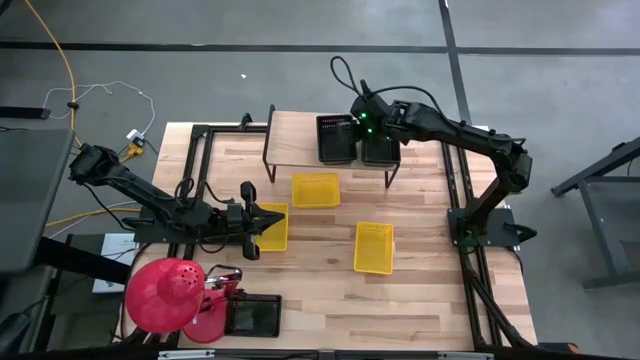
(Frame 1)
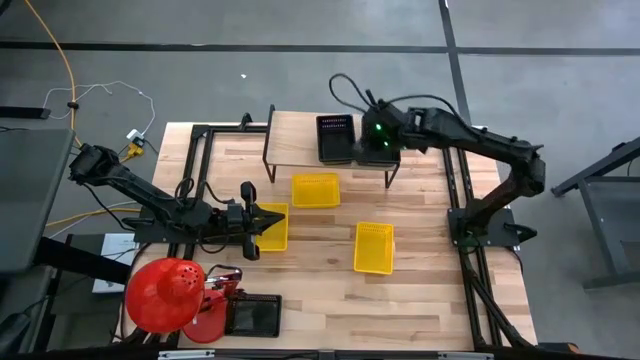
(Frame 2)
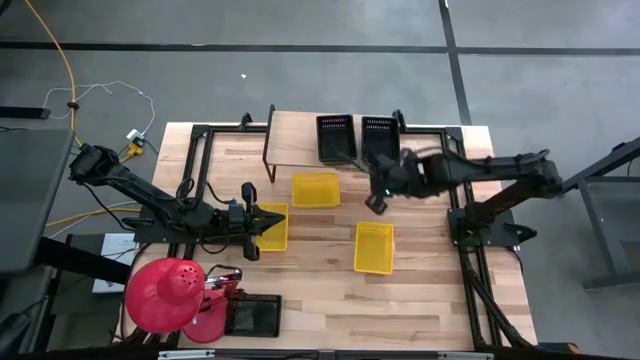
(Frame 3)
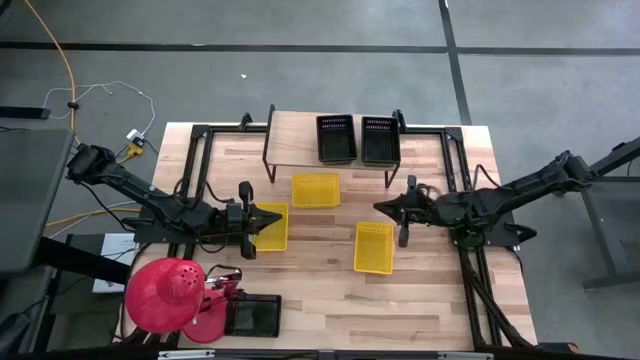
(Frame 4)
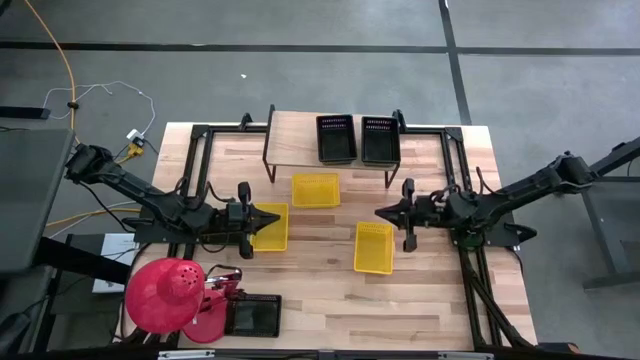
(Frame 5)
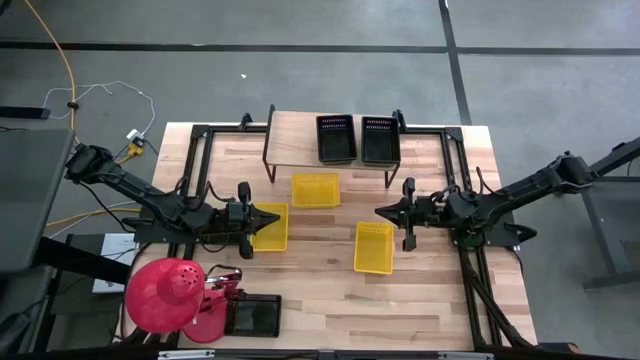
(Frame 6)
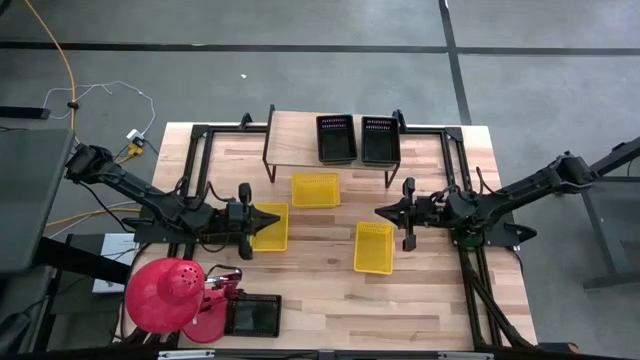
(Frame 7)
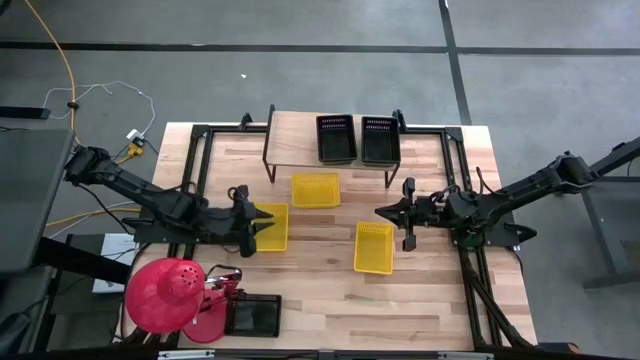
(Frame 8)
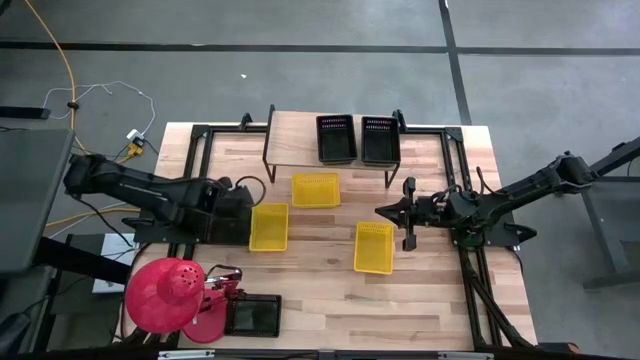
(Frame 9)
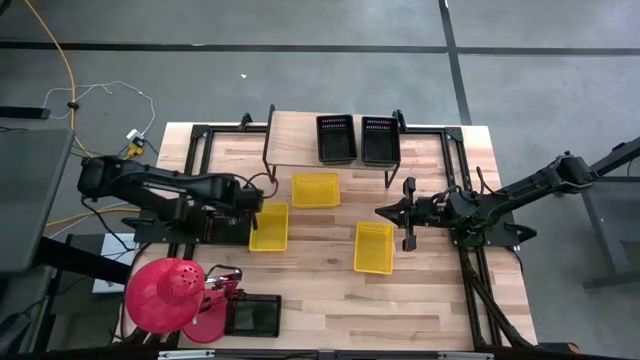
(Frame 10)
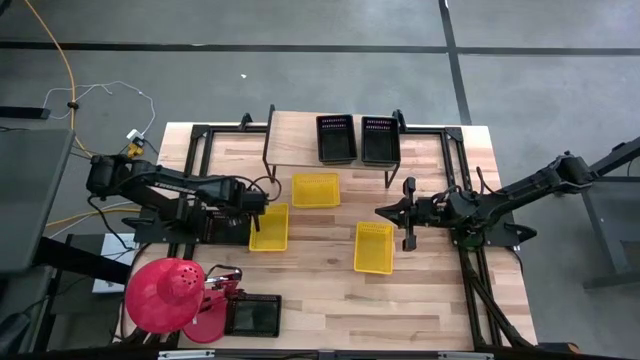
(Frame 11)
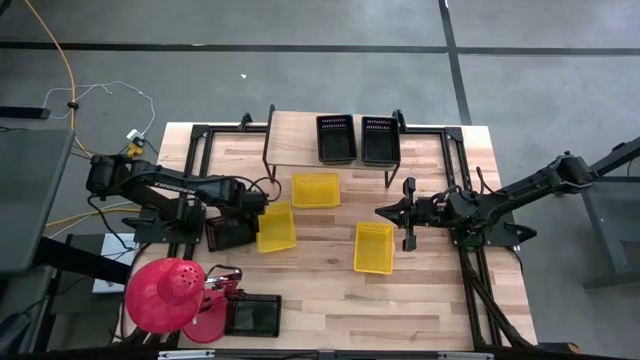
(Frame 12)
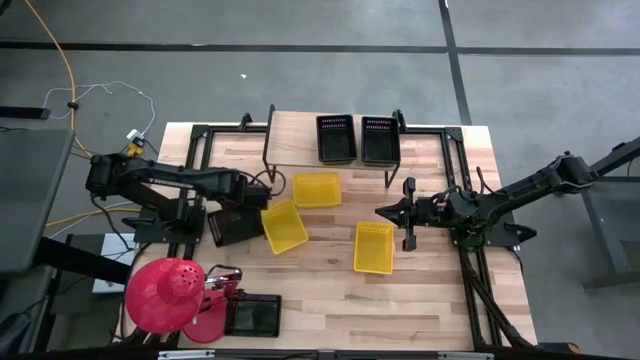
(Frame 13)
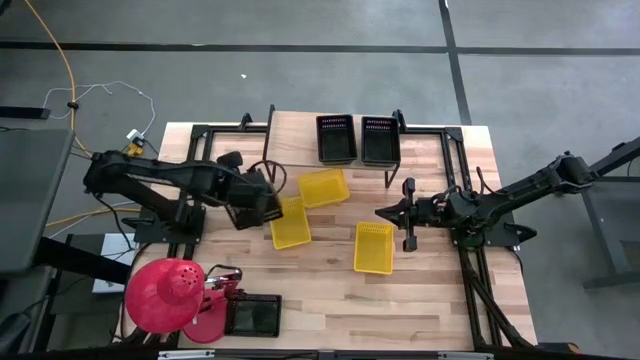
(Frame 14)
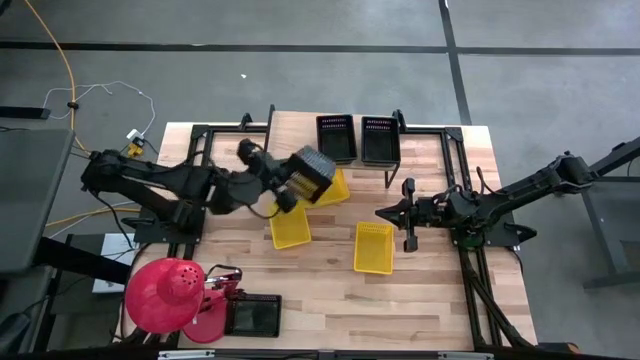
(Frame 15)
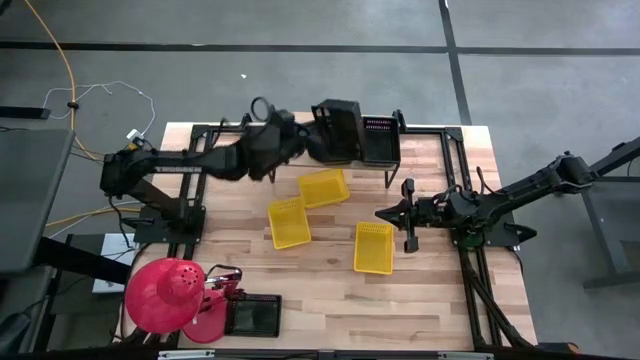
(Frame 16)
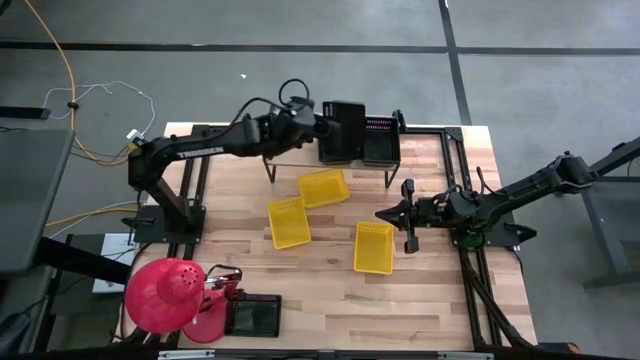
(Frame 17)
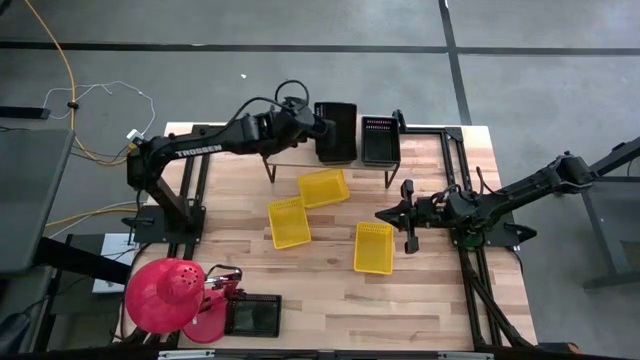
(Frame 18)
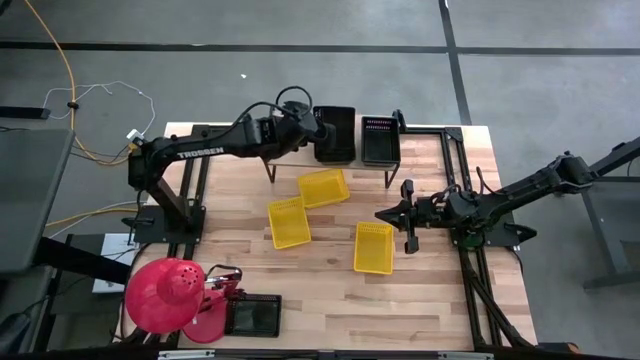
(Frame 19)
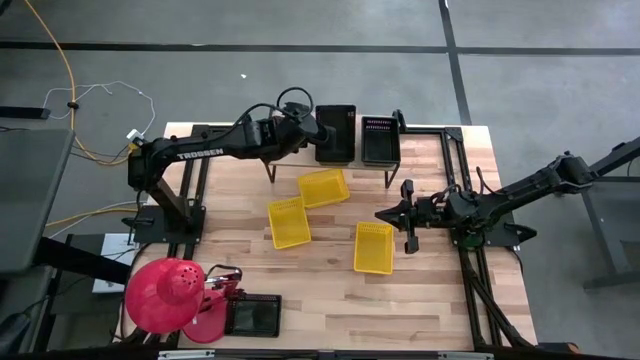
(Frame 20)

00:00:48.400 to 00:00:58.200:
Task: Stack baskets on shelf by color
Stack the black bin on the black bin on the shelf

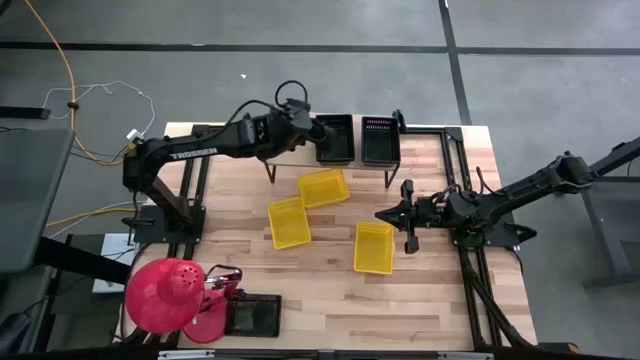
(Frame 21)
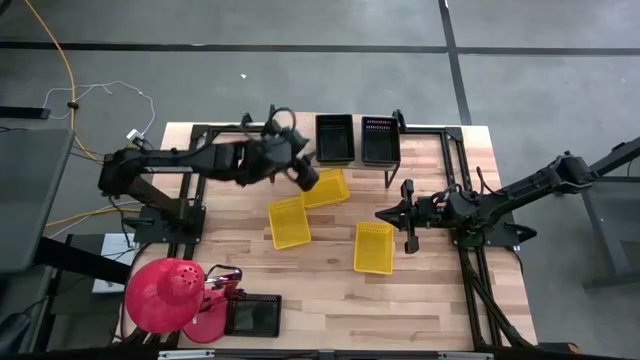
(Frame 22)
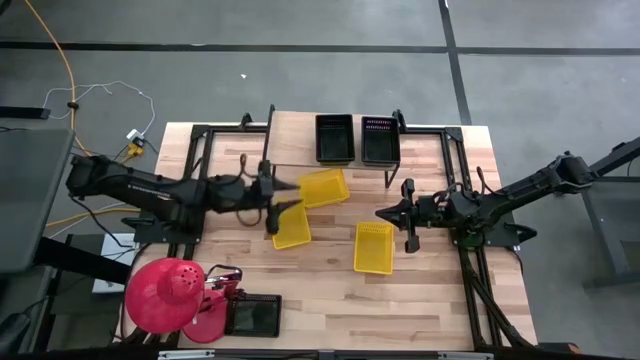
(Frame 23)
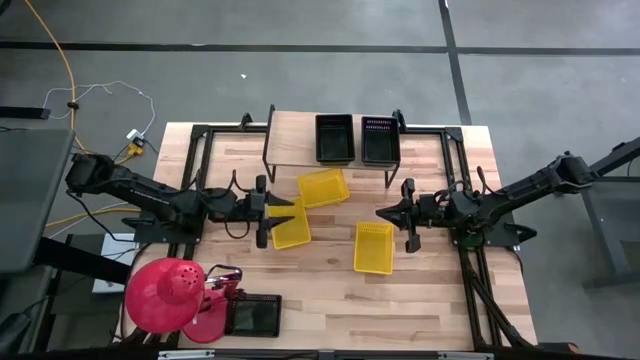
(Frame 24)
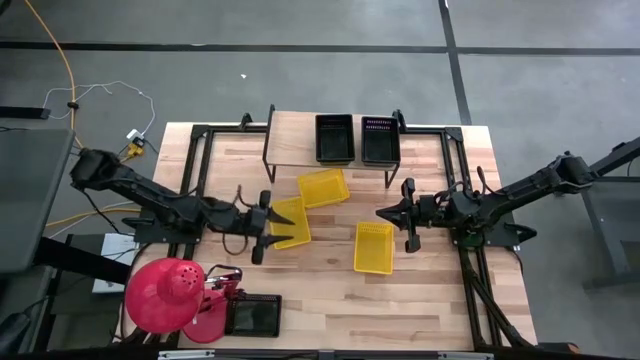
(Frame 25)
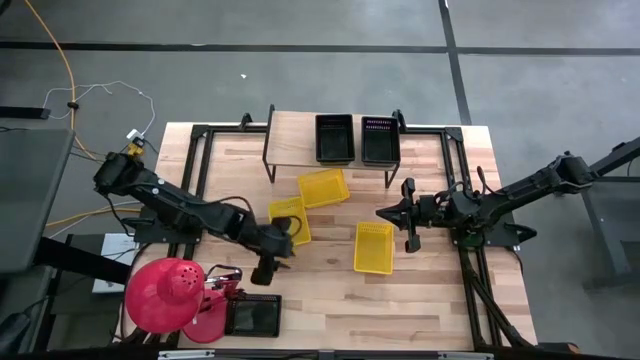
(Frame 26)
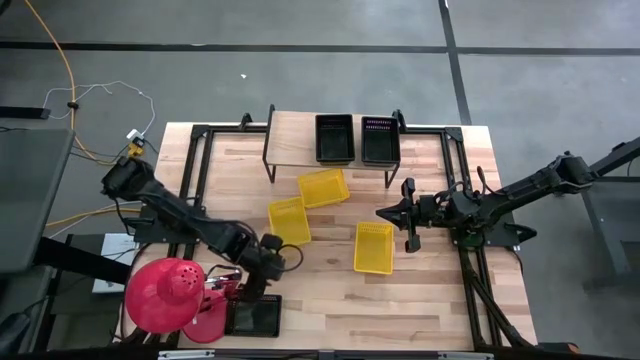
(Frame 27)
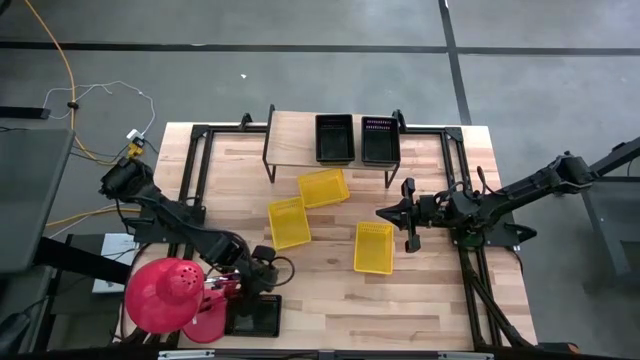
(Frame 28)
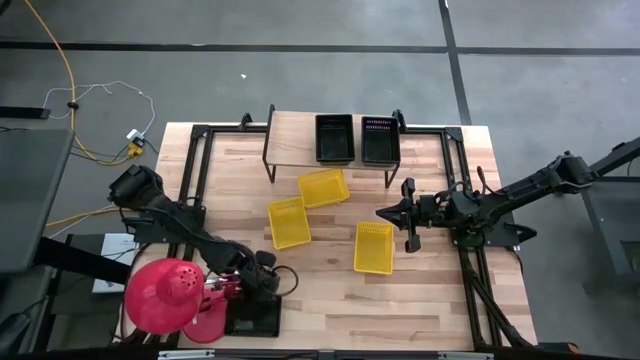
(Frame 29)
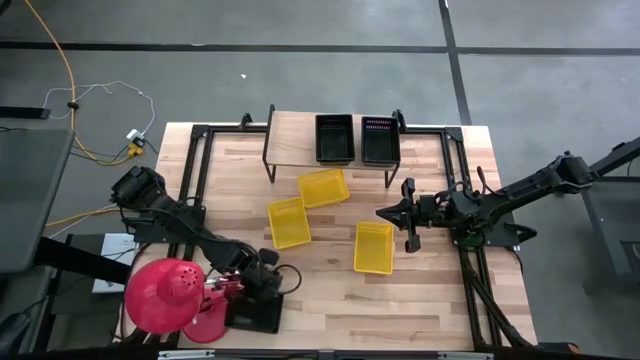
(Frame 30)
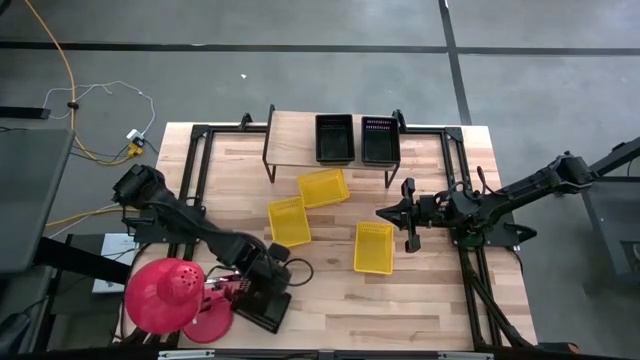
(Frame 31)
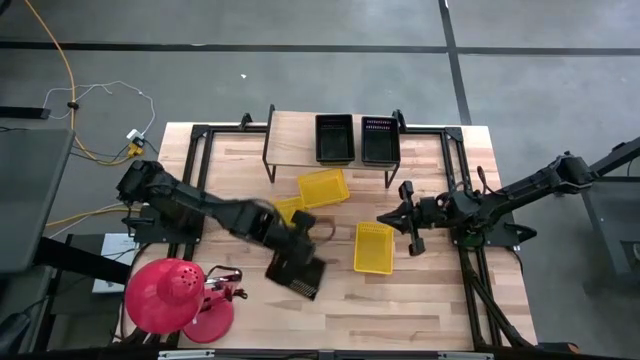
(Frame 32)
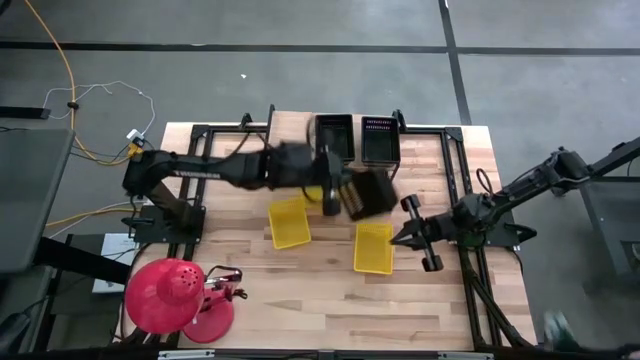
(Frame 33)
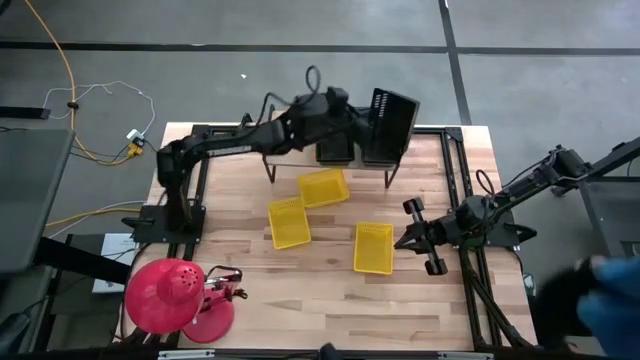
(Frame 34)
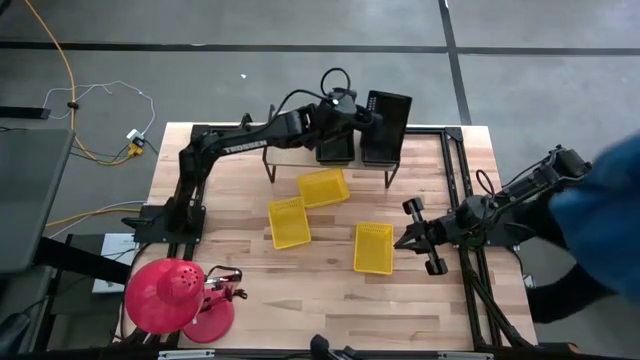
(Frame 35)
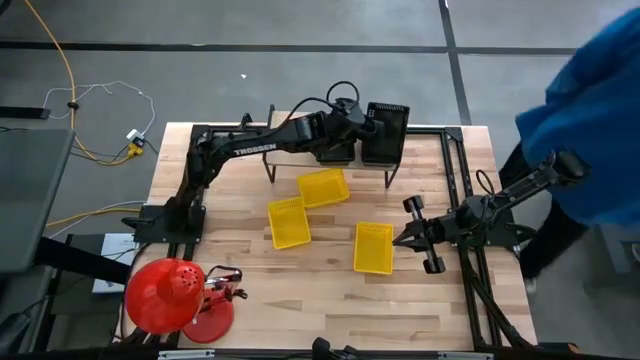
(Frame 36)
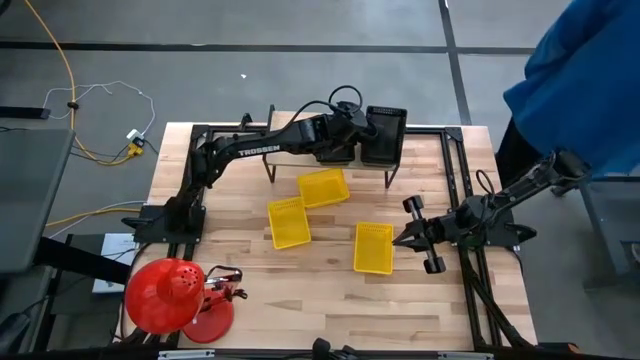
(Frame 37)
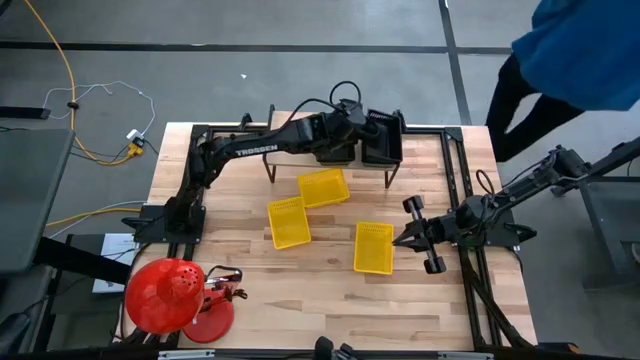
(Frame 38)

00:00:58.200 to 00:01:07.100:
Stack the black bin on the black bin on the shelf

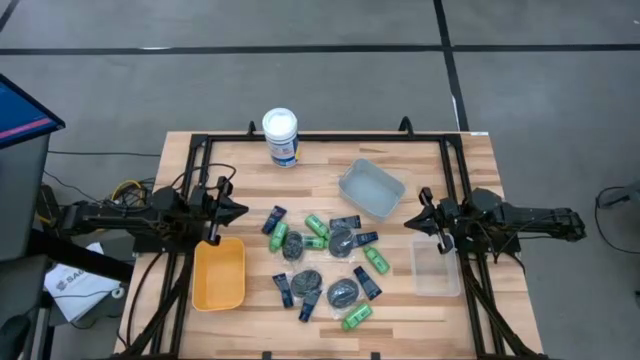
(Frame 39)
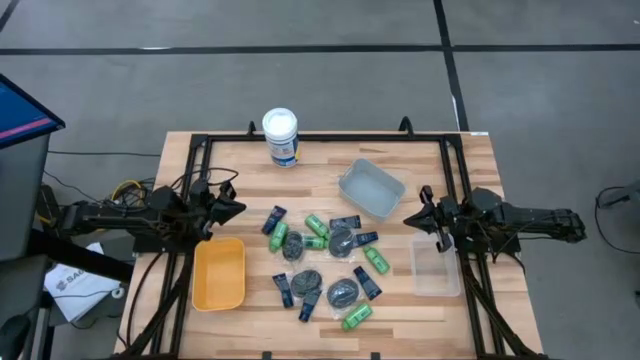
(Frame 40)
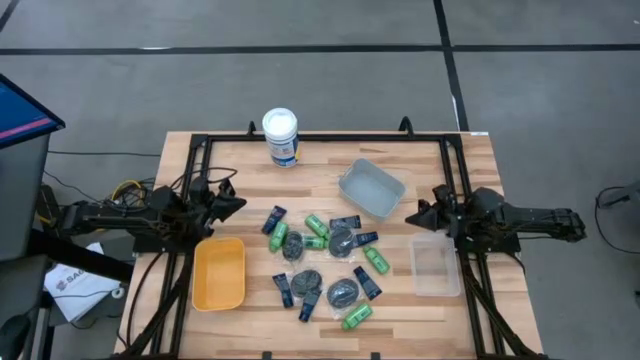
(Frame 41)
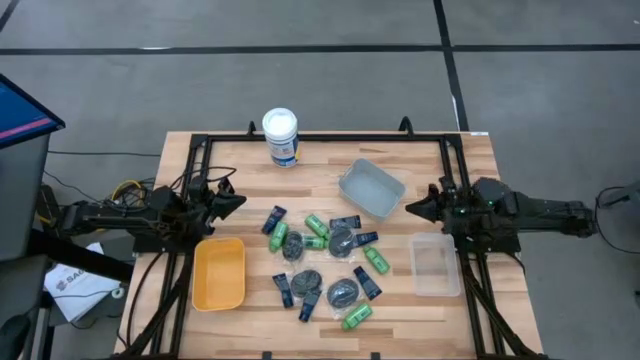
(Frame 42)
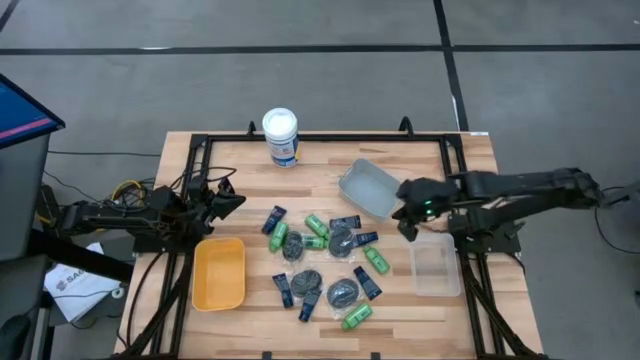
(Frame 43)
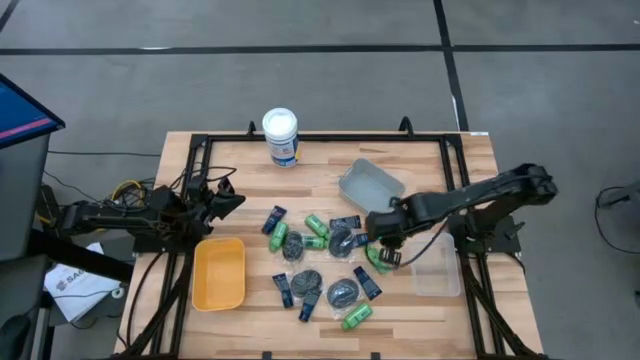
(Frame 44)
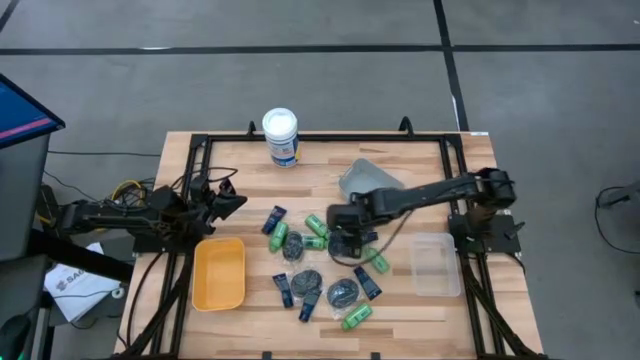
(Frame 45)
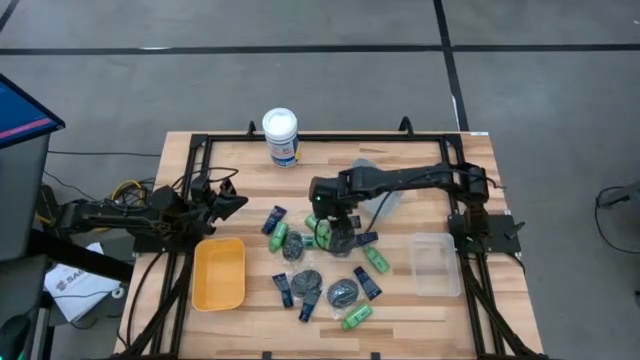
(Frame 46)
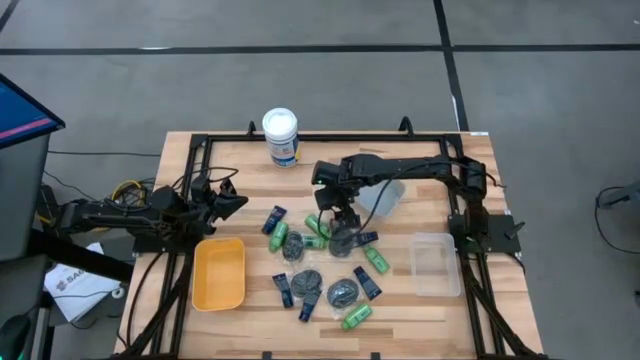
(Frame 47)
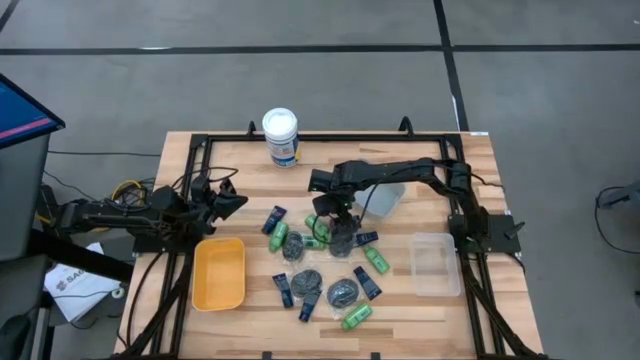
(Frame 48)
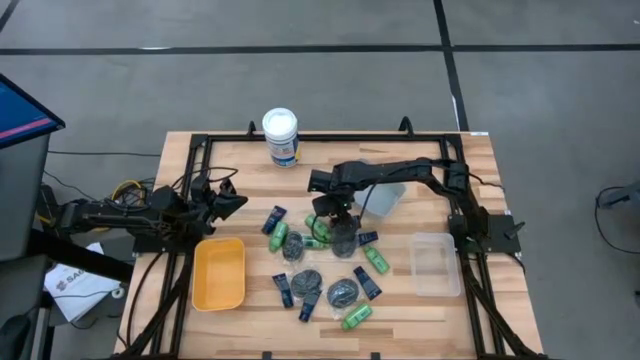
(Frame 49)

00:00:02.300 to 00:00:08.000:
Task: Pick & Place Travel size toiletries
Put the black hairbrush into the transparent bin
